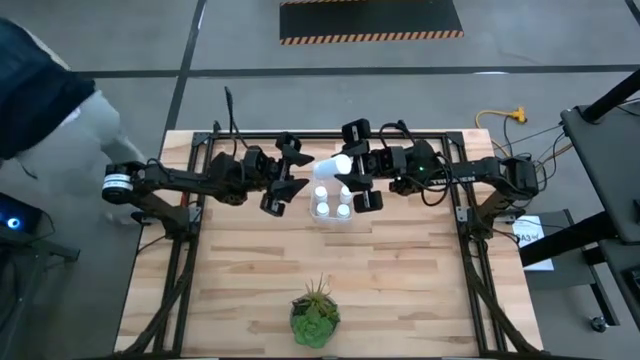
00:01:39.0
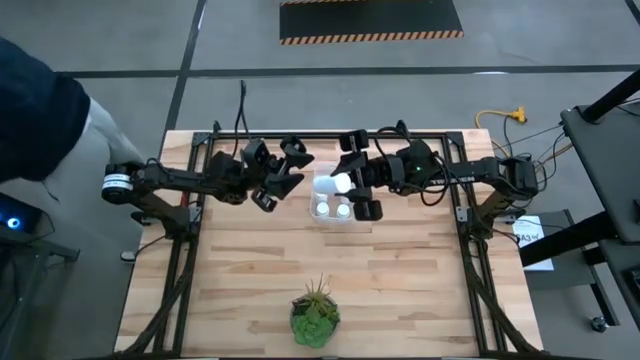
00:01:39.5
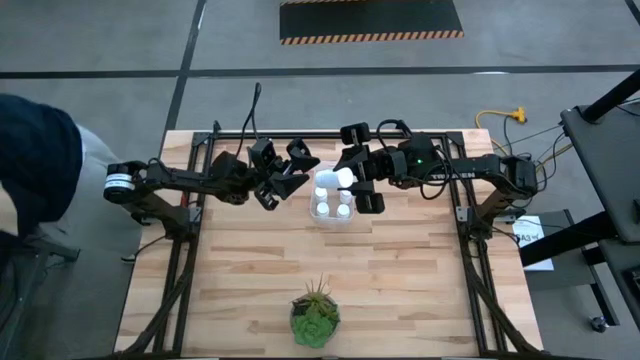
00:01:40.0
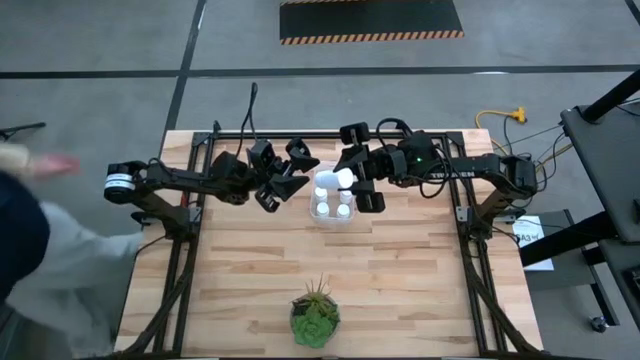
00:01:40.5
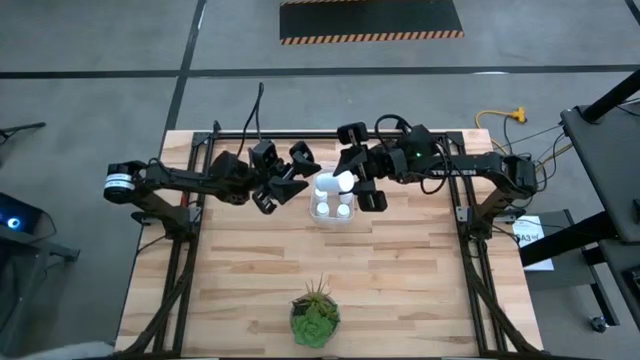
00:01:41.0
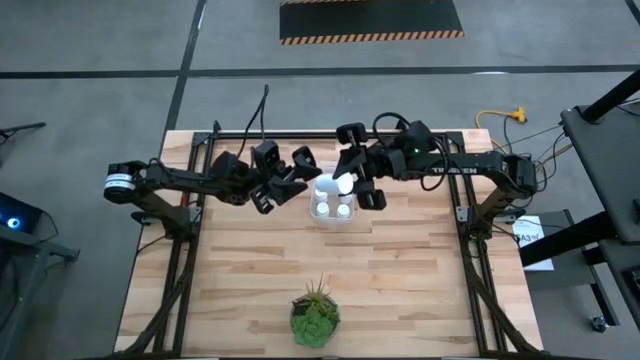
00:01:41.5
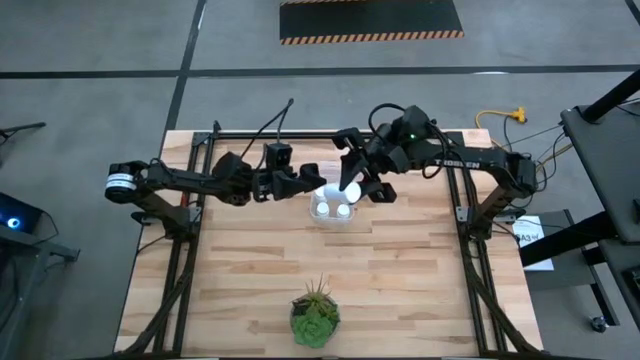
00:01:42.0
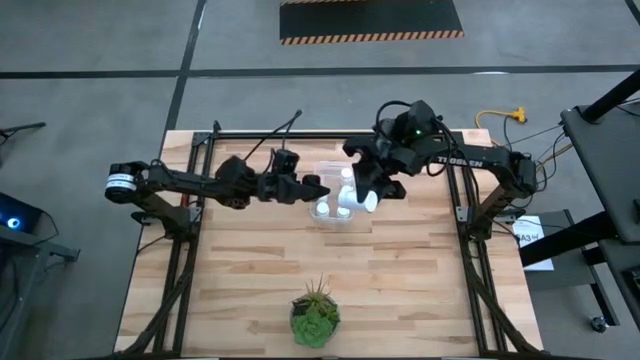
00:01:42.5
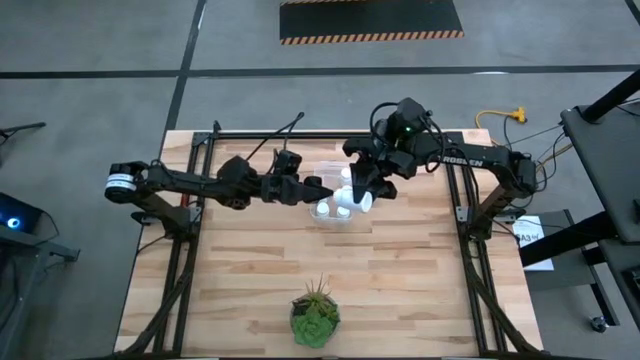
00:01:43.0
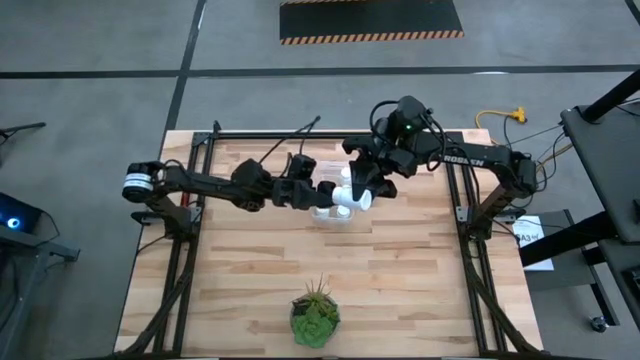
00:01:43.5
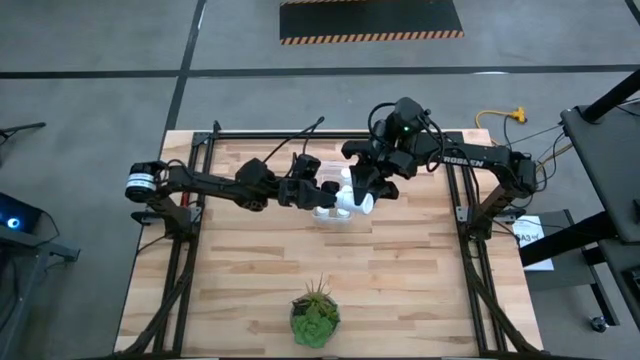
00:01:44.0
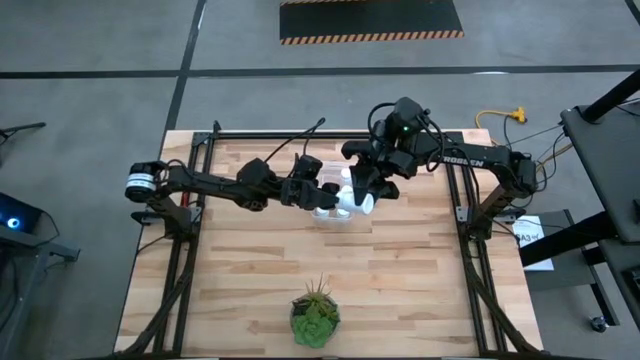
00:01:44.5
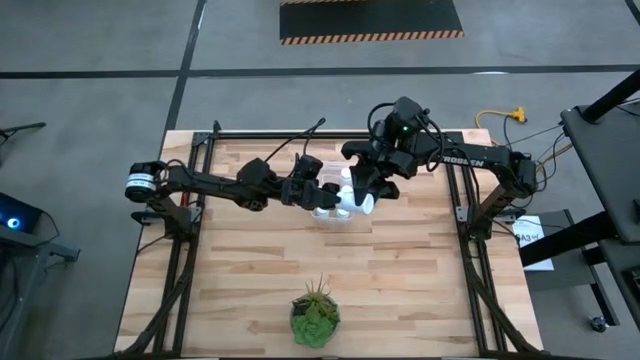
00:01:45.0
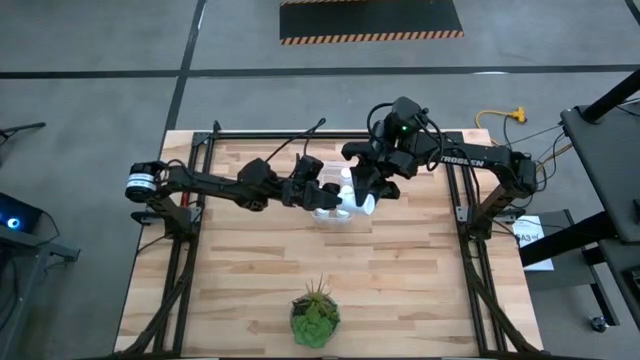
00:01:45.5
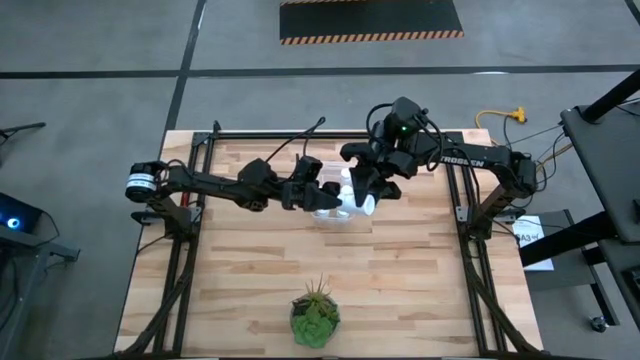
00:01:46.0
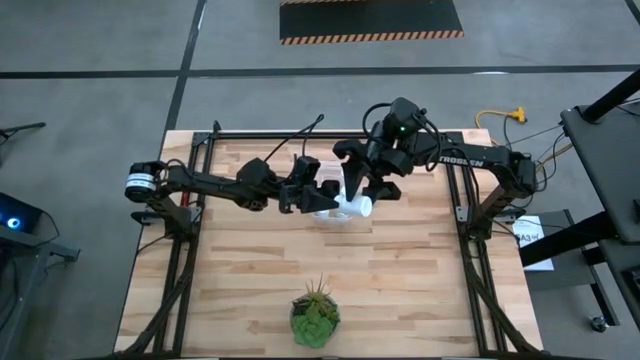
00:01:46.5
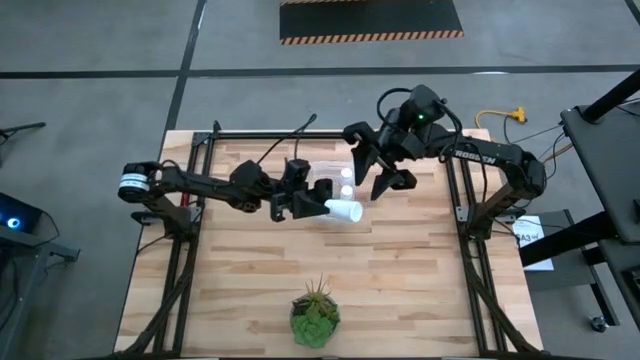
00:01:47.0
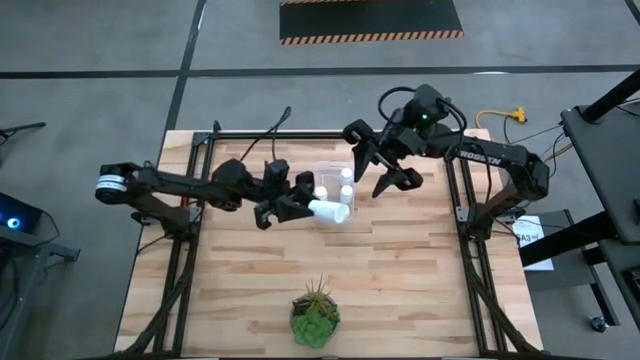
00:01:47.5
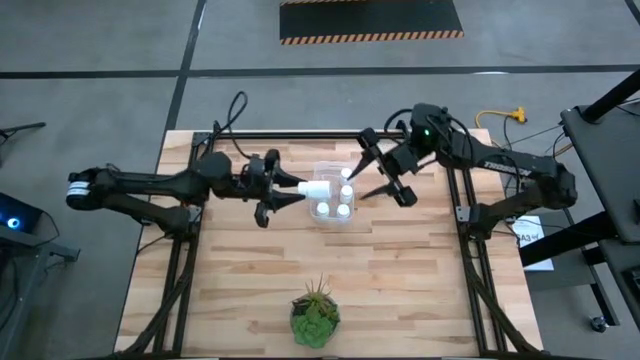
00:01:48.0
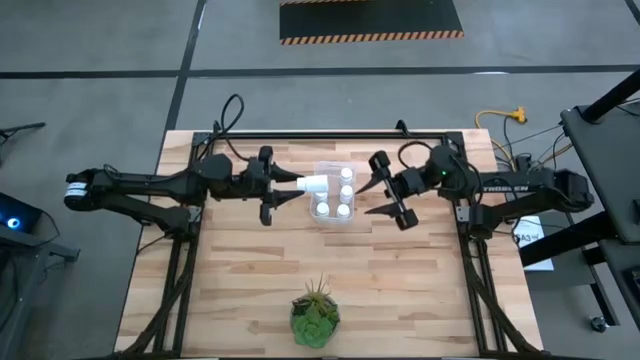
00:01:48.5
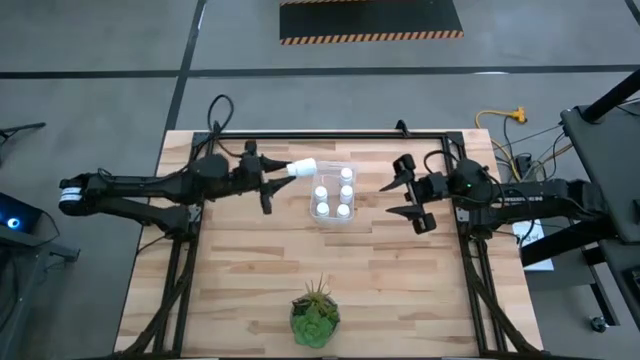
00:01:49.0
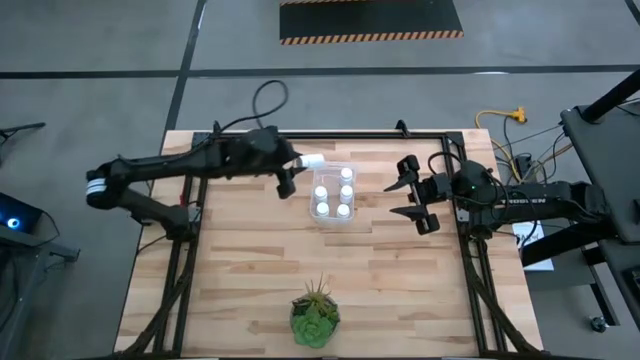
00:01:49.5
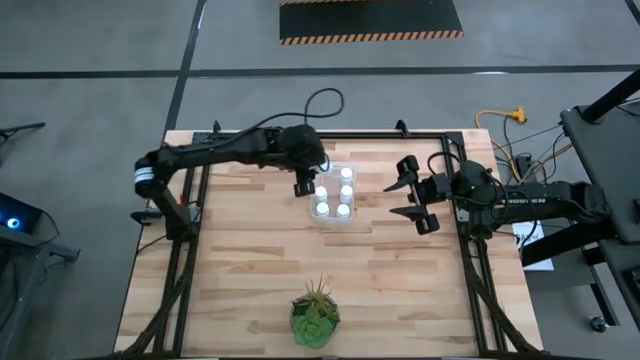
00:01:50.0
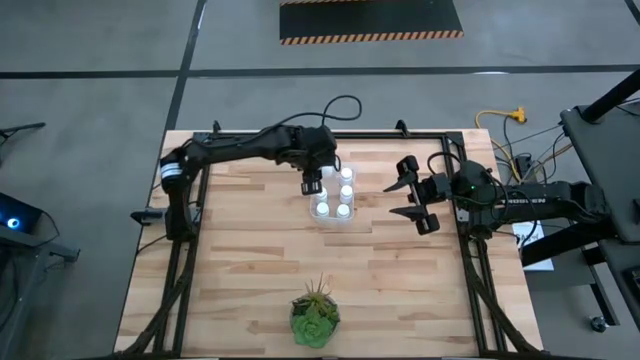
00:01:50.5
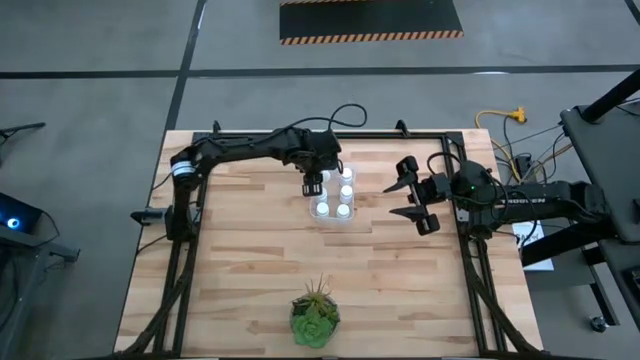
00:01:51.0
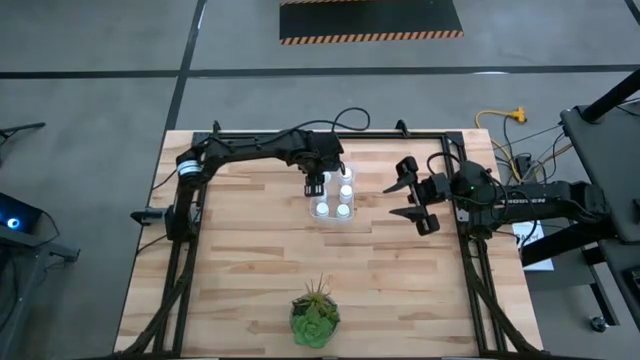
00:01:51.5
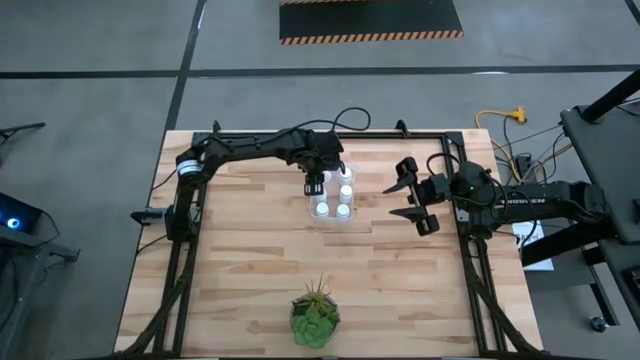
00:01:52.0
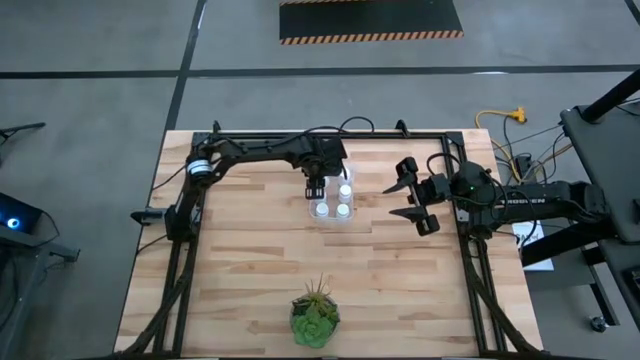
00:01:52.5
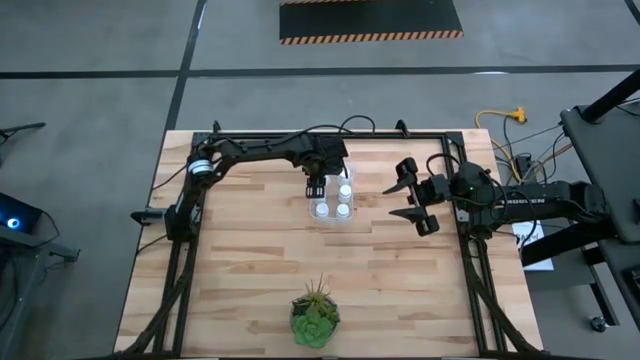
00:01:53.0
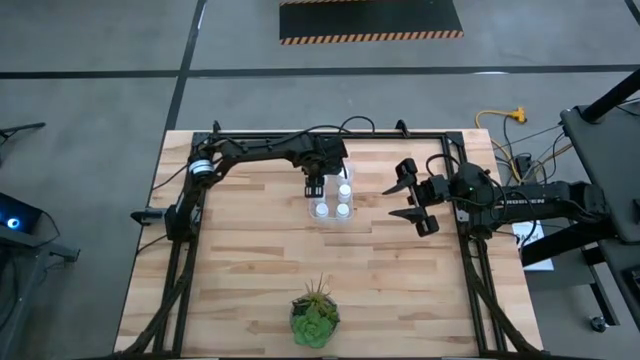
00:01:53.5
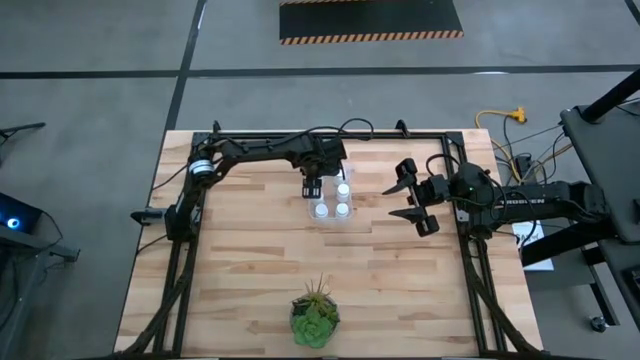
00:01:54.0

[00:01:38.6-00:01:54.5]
Task: Pick and place pill bottles into a basket
Put the white pill bottle into the transparent bin

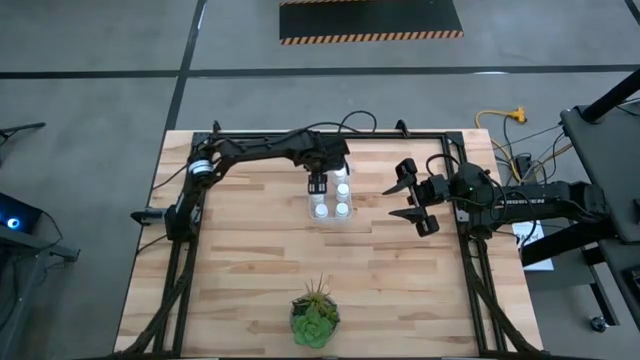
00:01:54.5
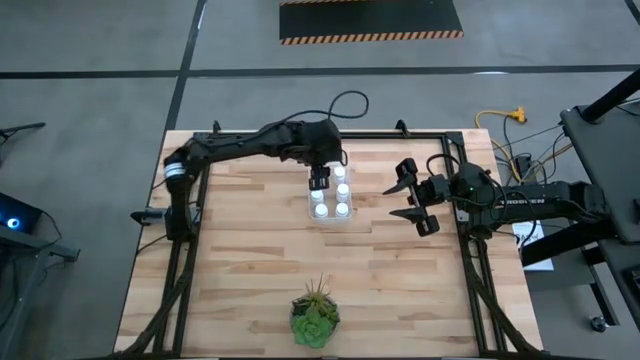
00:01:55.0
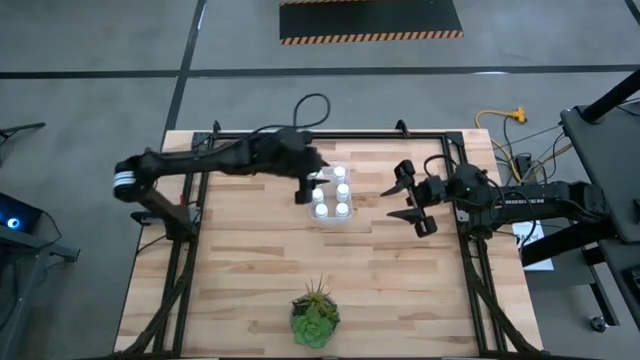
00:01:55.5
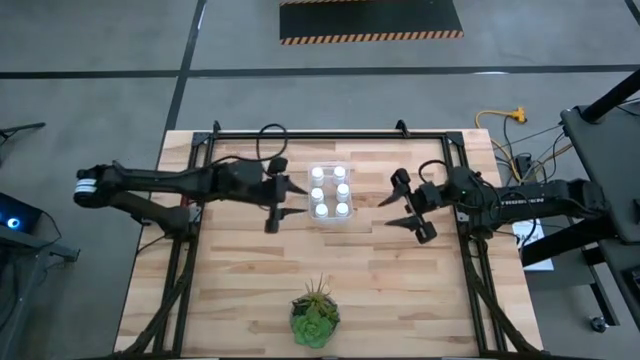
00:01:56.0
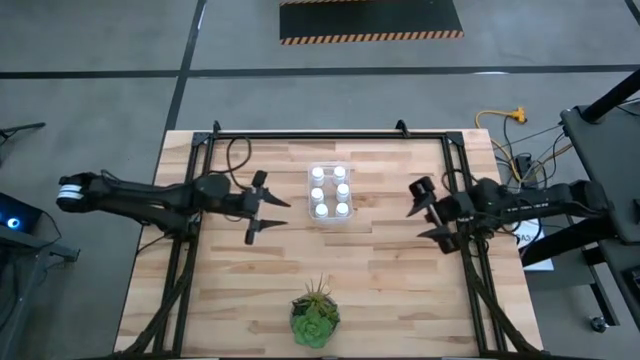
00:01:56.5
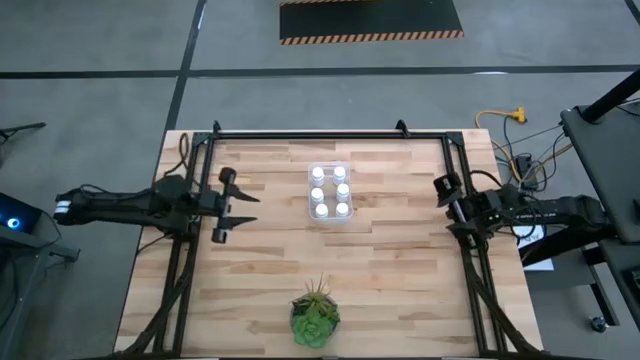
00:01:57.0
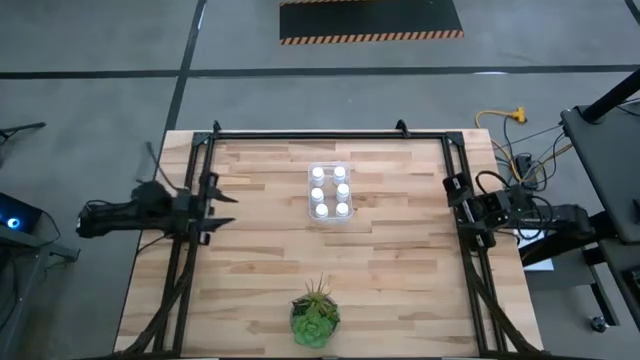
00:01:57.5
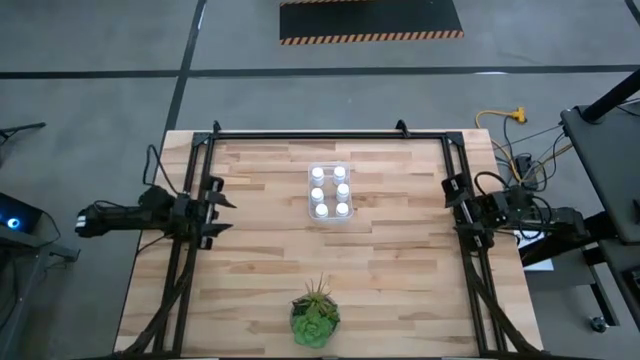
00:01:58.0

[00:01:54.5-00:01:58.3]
Return to Home Position
